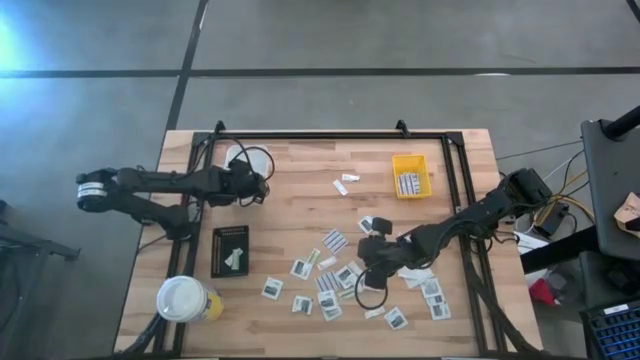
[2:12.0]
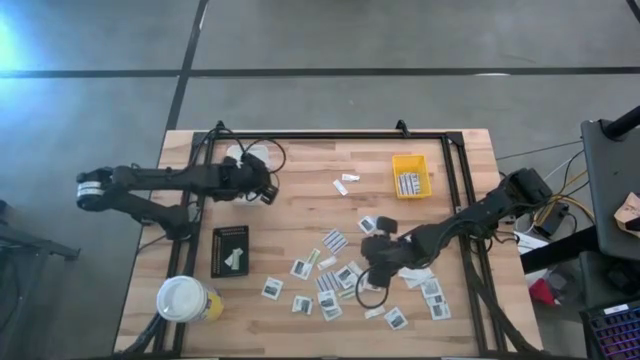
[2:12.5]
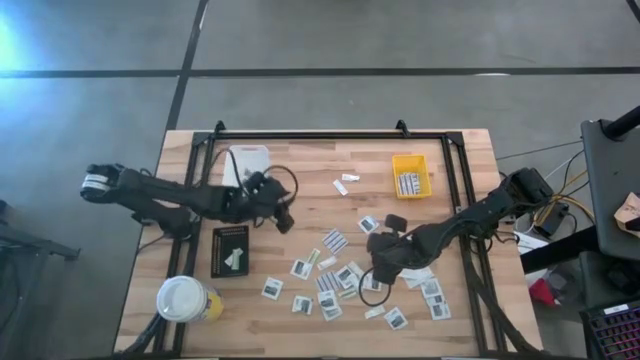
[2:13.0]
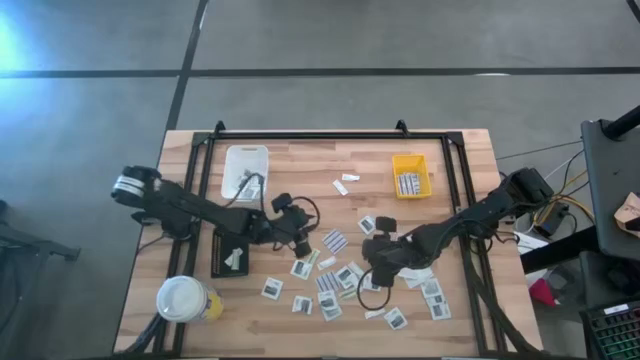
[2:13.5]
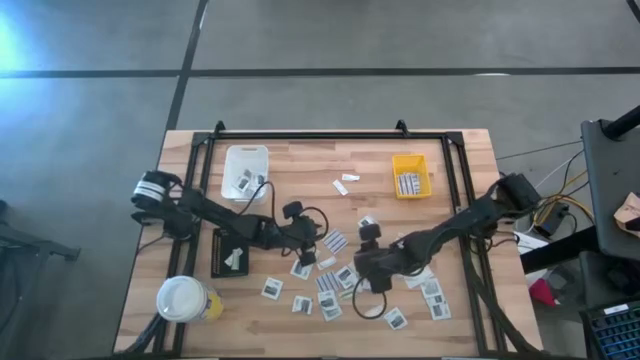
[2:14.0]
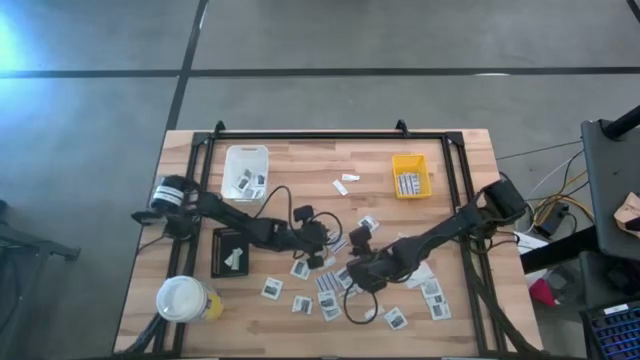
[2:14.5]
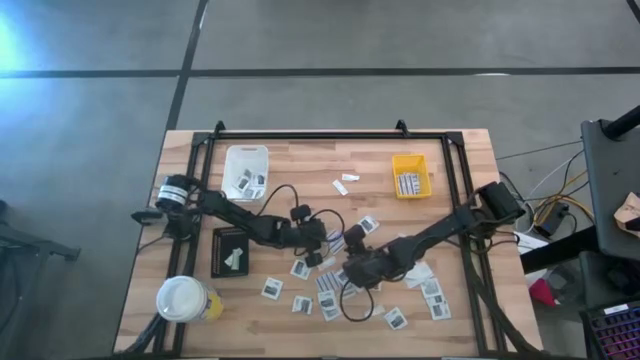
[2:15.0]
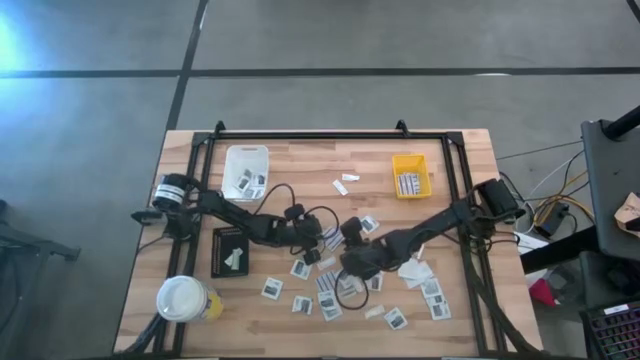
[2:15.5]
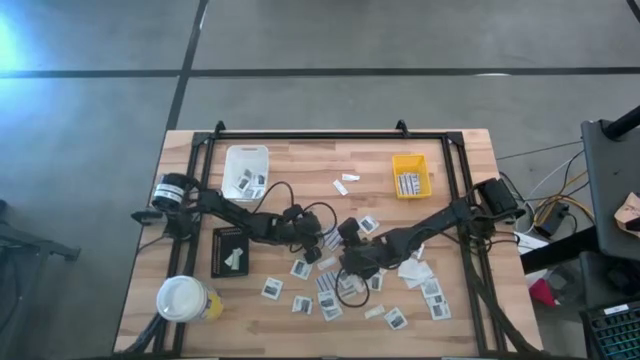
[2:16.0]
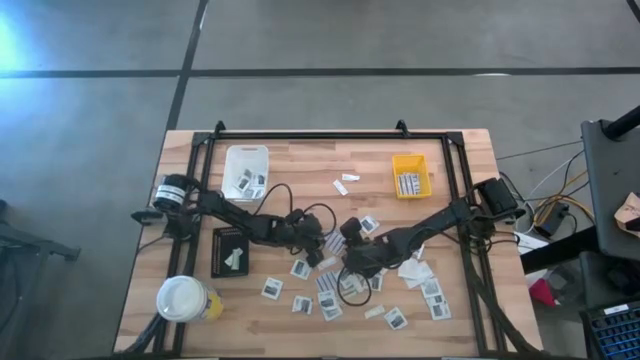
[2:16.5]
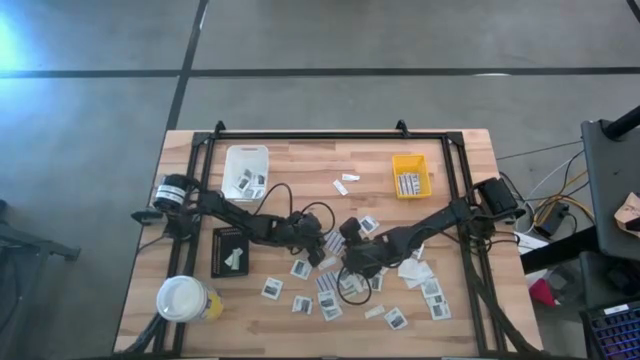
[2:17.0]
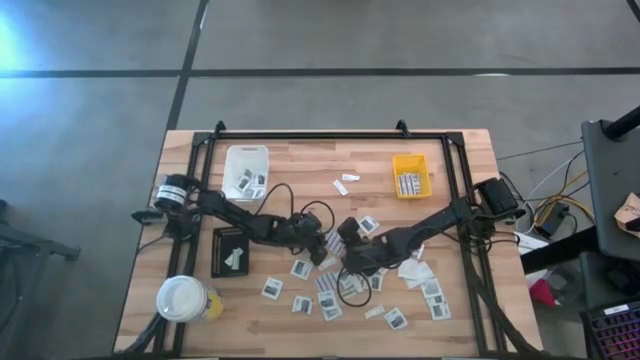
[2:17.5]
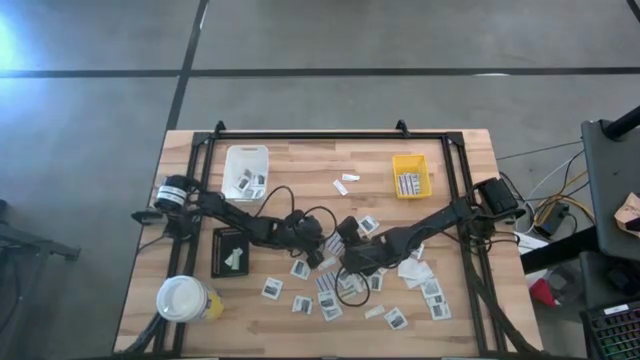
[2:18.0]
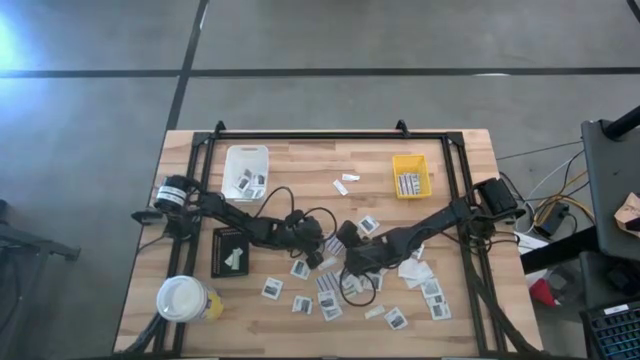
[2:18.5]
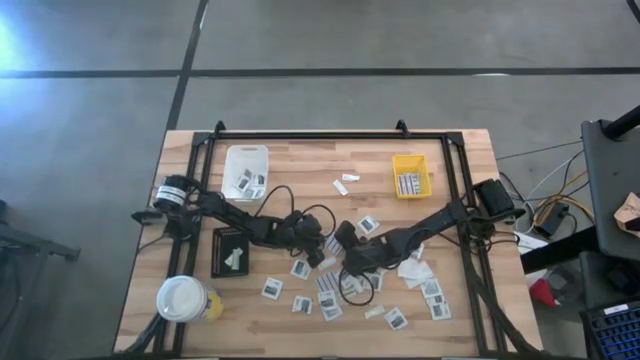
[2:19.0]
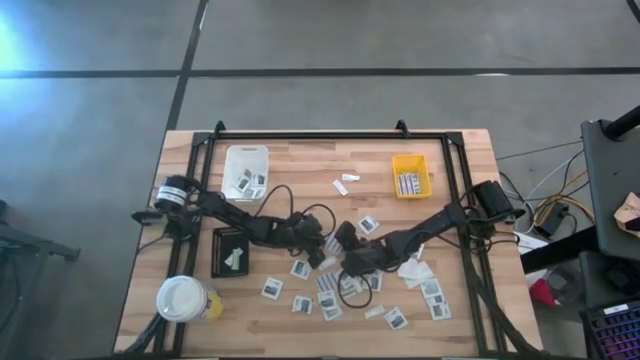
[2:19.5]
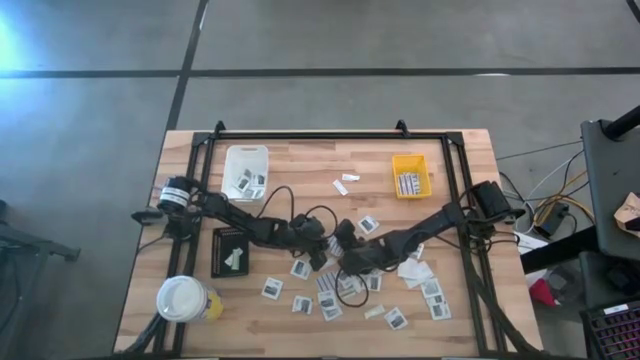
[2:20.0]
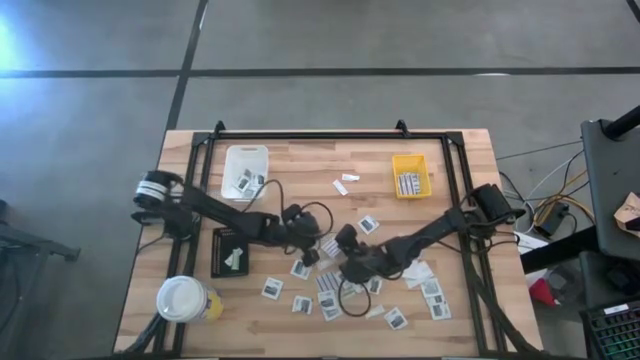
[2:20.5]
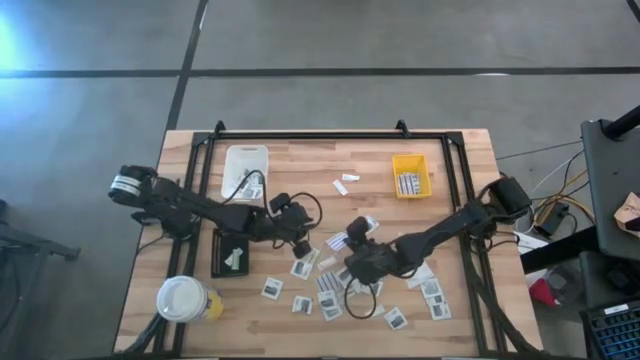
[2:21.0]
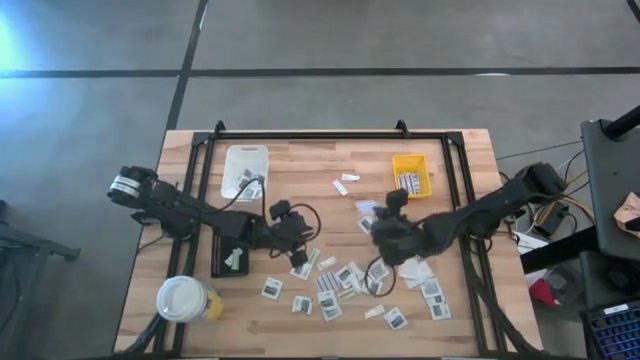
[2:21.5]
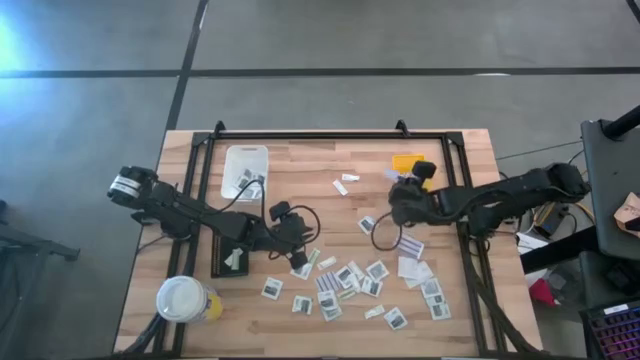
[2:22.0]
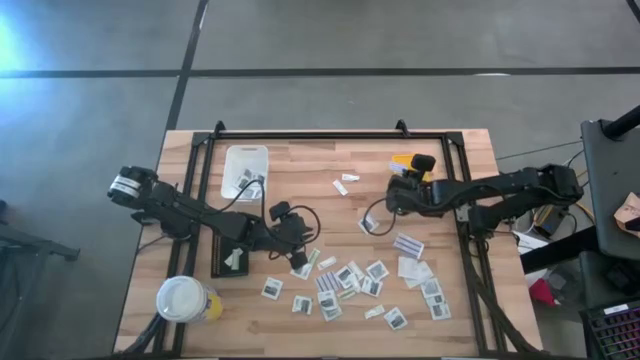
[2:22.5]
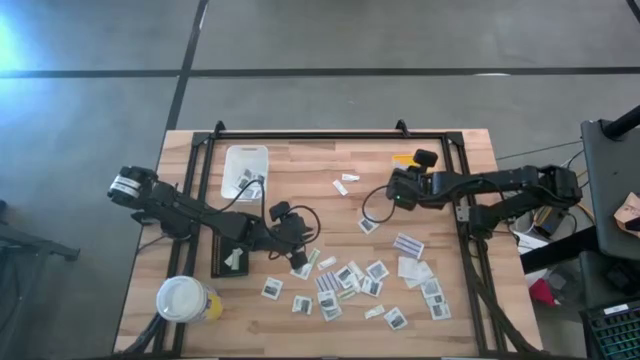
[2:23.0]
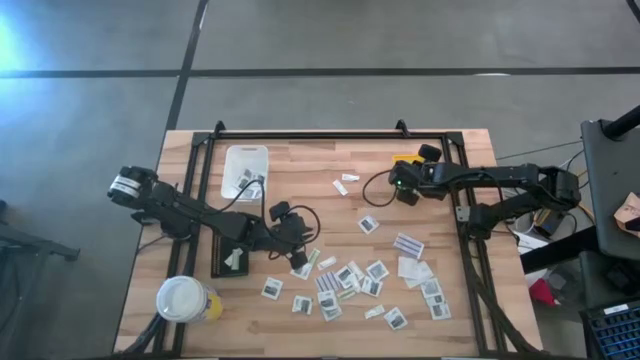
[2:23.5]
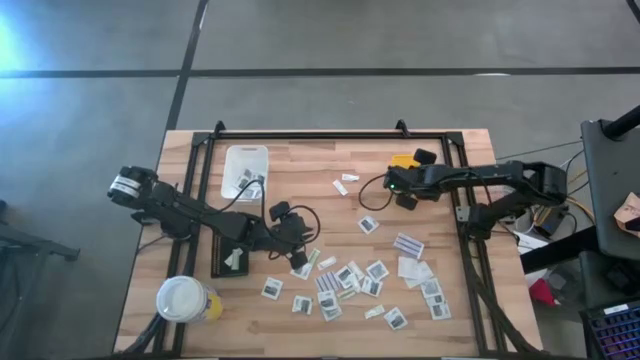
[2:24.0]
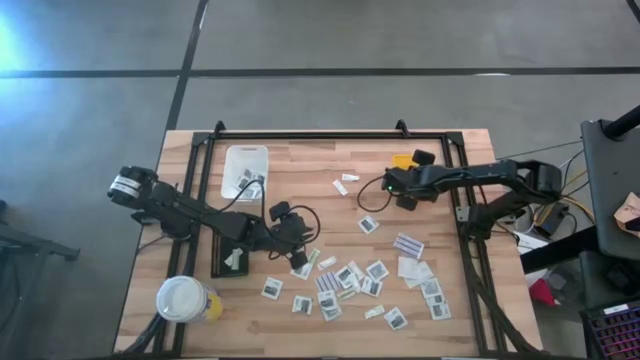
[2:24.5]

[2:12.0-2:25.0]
Task: Pick & Place First Aid Supplies
Put the blue bandage pack into the yellow bin

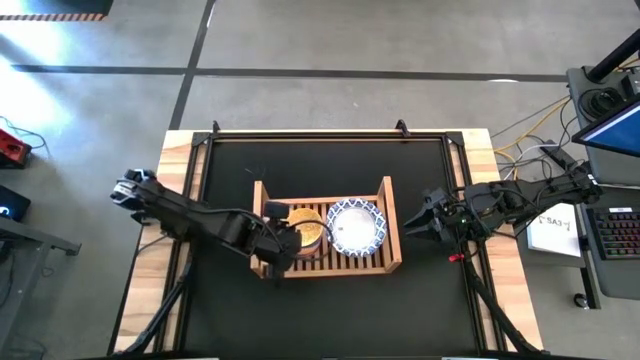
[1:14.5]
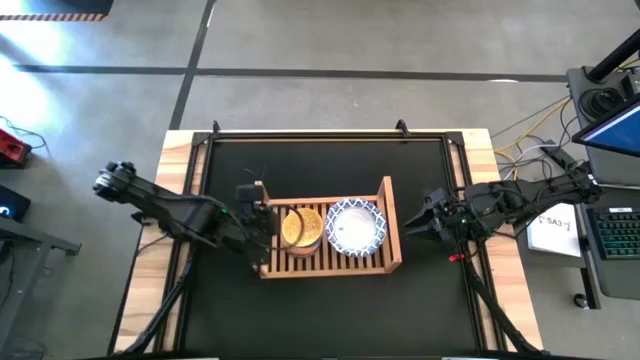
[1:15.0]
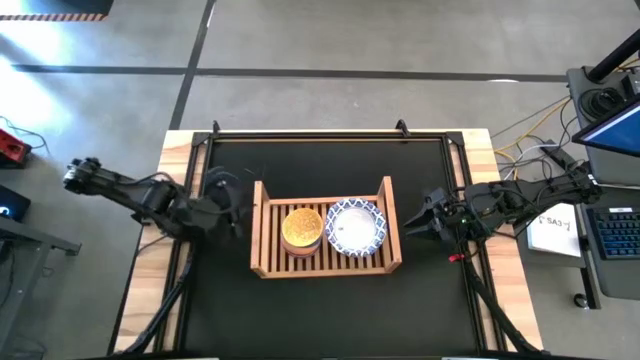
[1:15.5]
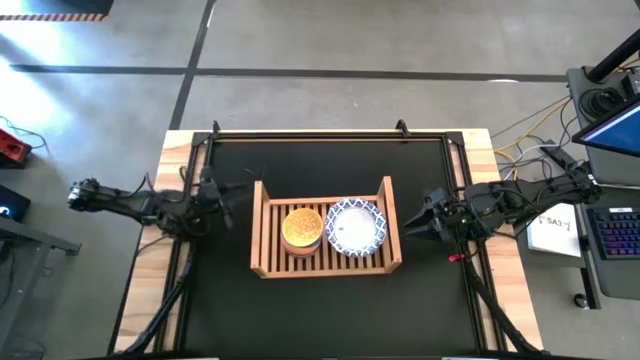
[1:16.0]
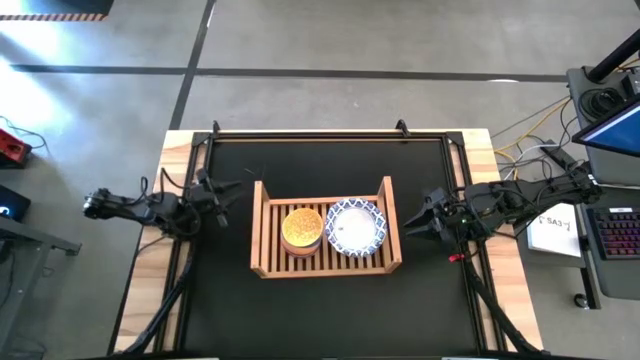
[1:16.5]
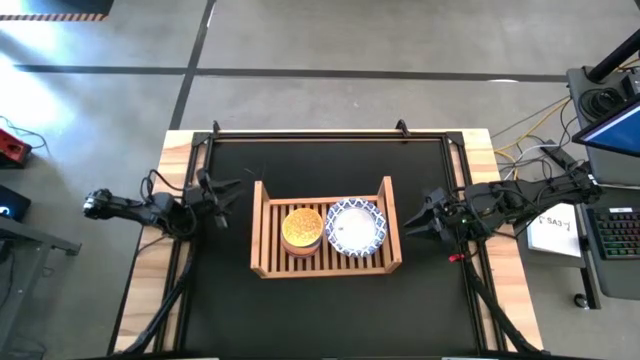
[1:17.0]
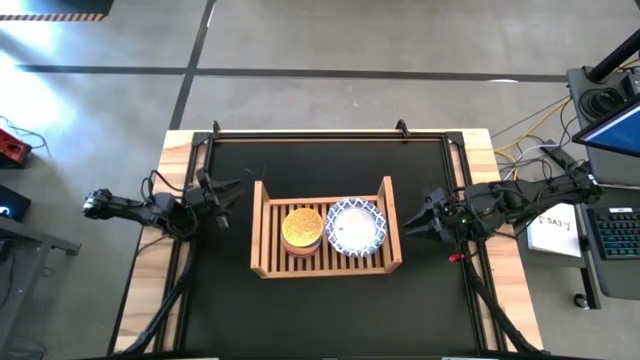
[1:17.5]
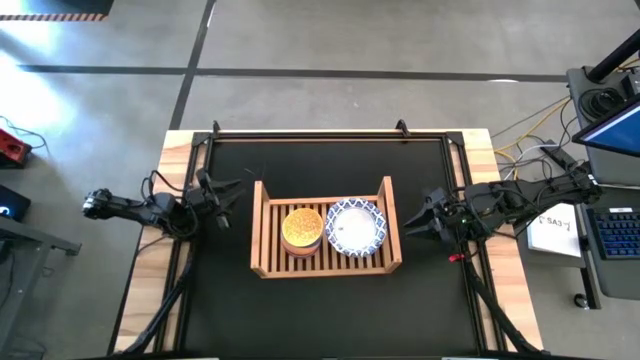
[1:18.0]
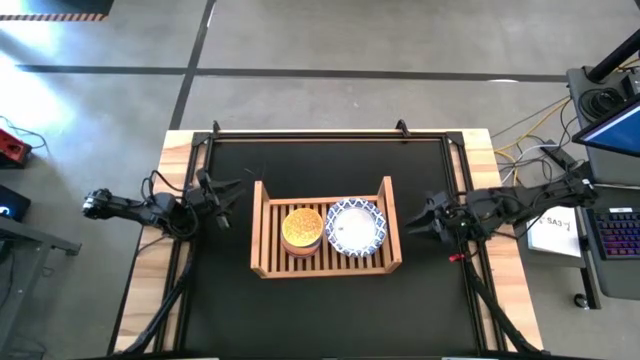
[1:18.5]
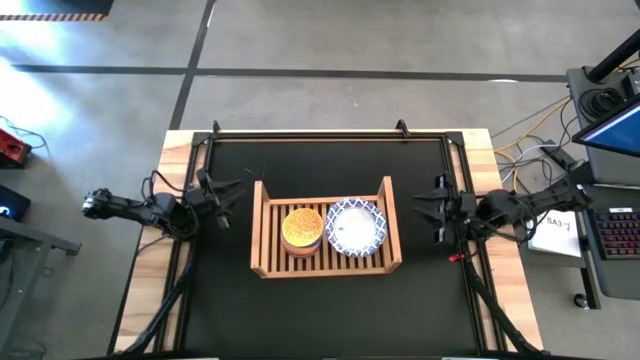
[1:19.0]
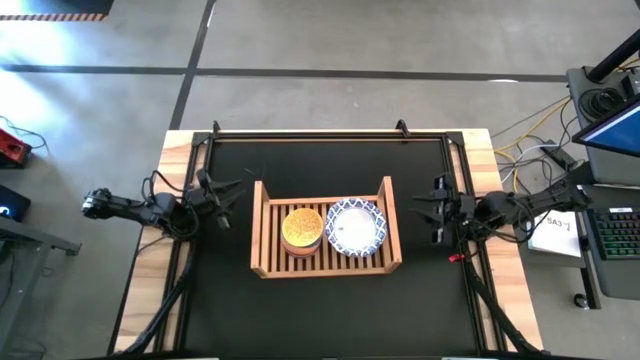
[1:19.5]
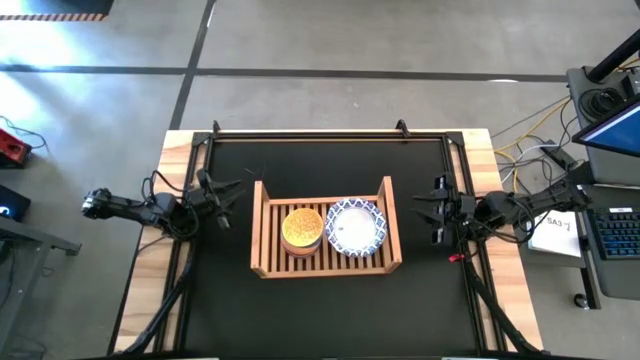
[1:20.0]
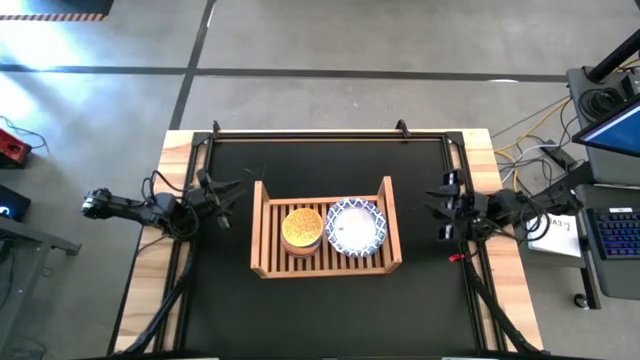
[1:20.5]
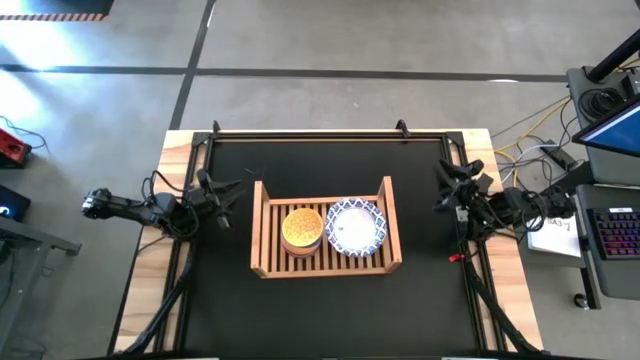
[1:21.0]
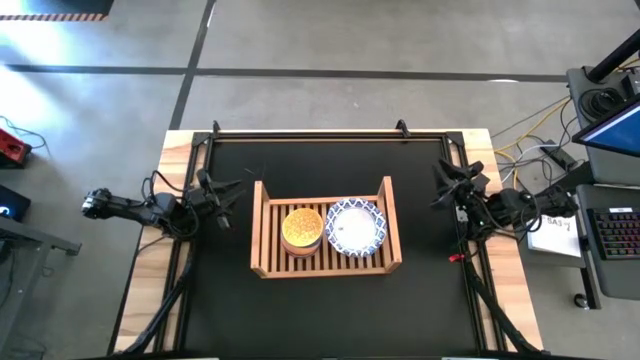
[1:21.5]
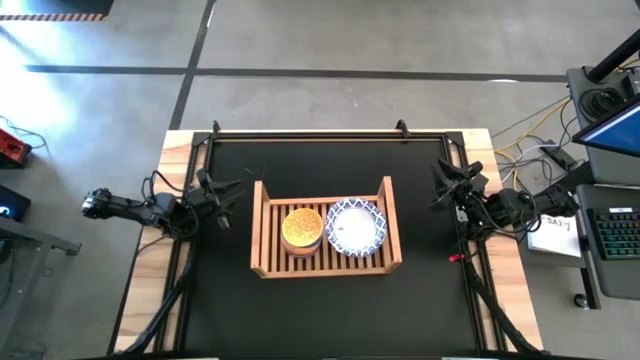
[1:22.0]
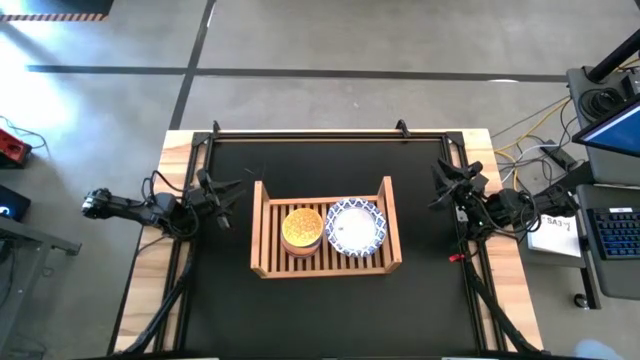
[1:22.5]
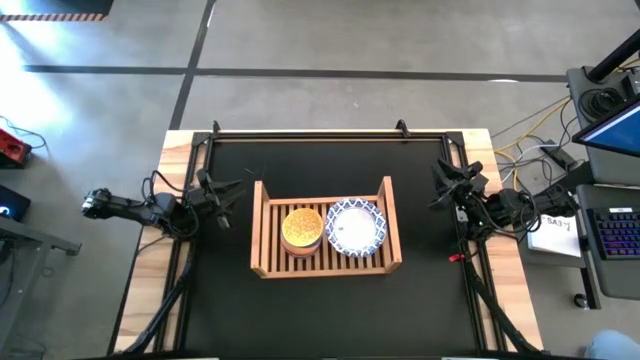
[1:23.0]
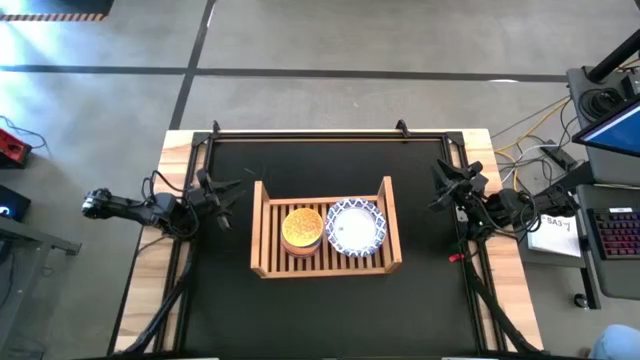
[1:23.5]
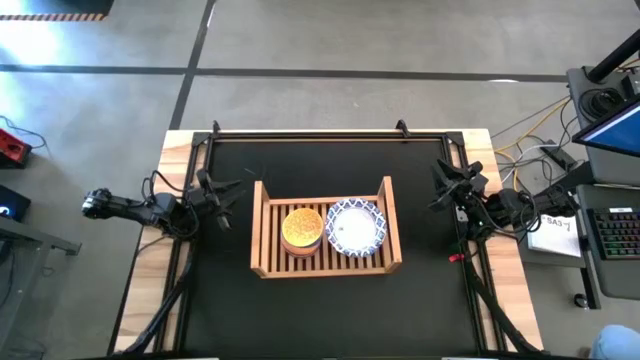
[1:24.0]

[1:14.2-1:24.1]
Task: Place and stack bowls onto a shelf
Return to Home Position
